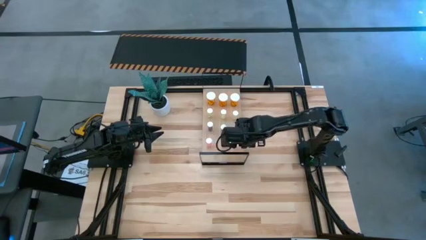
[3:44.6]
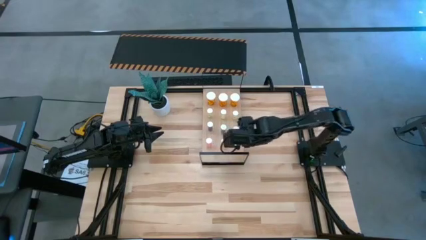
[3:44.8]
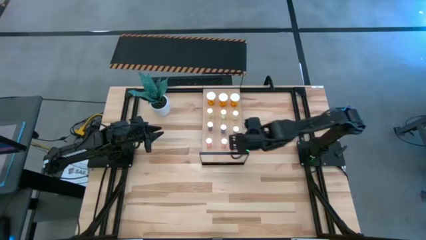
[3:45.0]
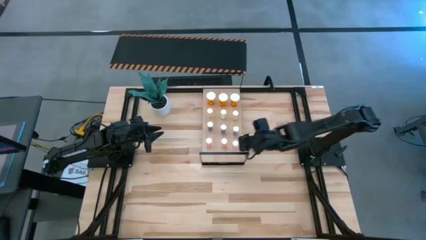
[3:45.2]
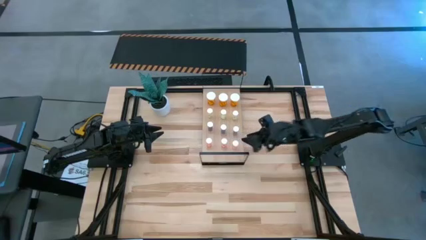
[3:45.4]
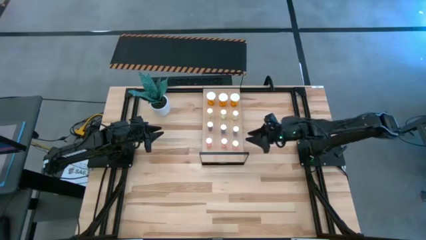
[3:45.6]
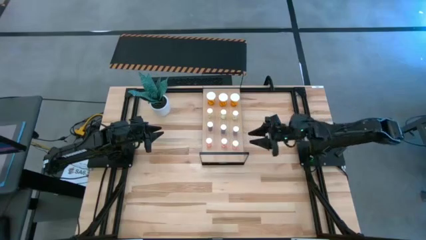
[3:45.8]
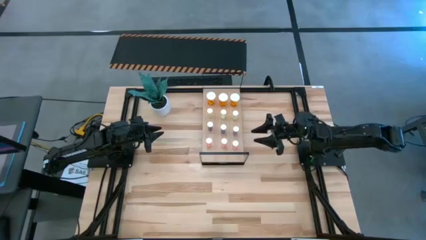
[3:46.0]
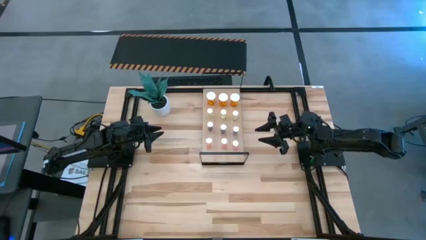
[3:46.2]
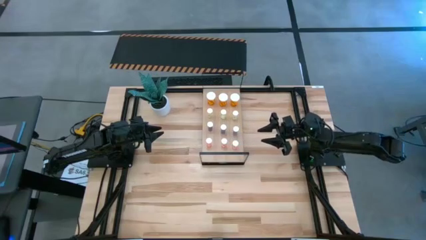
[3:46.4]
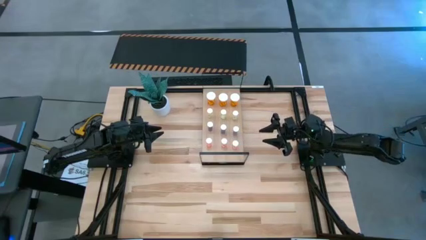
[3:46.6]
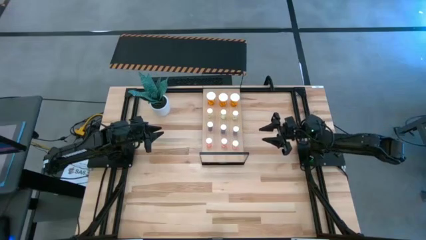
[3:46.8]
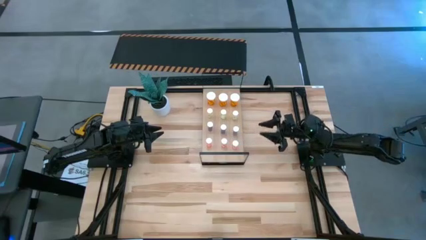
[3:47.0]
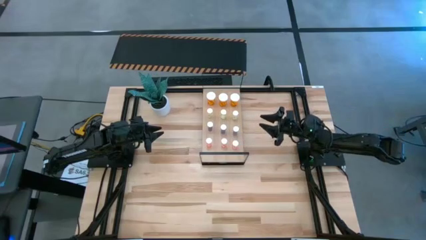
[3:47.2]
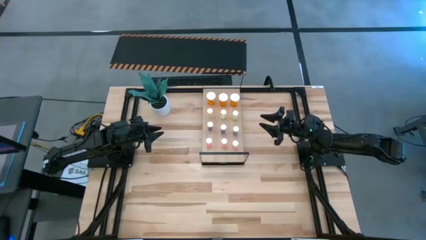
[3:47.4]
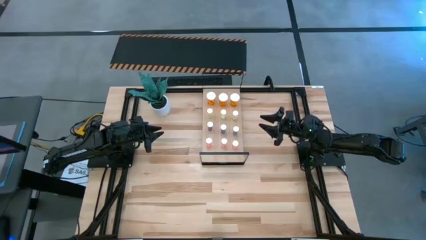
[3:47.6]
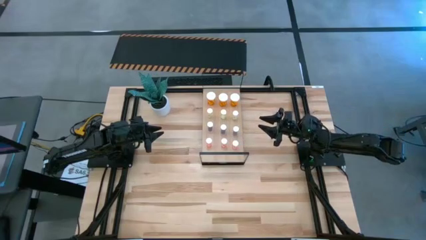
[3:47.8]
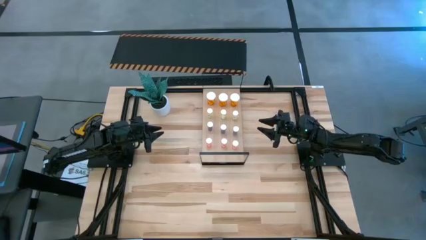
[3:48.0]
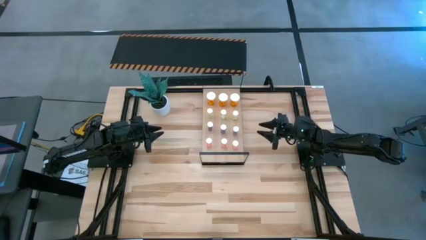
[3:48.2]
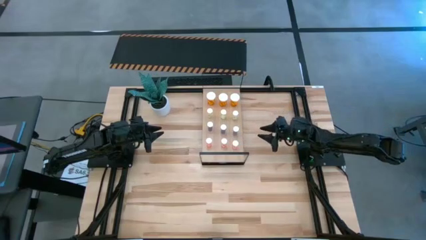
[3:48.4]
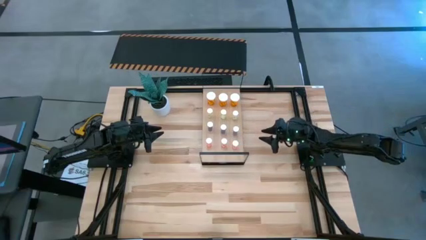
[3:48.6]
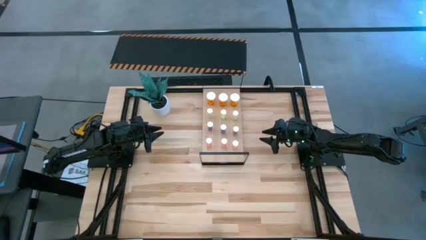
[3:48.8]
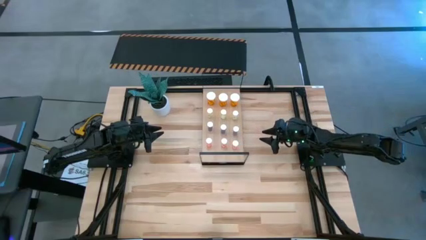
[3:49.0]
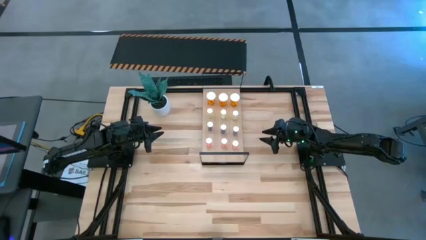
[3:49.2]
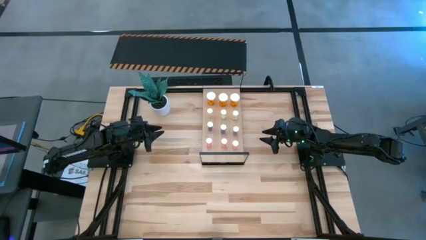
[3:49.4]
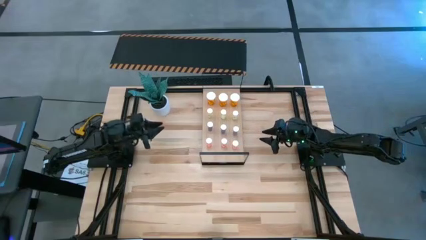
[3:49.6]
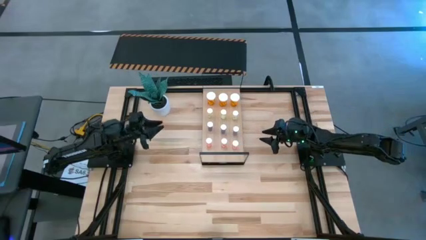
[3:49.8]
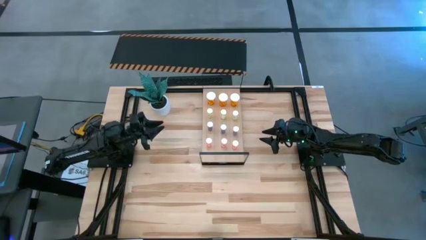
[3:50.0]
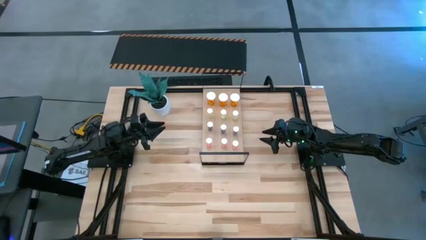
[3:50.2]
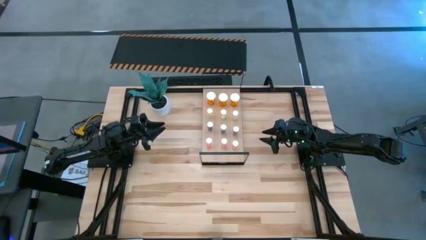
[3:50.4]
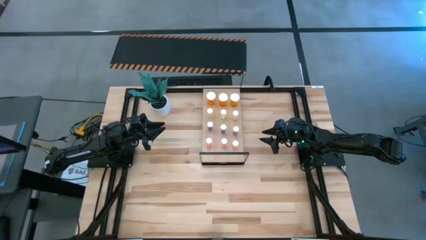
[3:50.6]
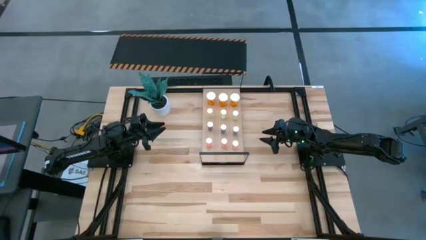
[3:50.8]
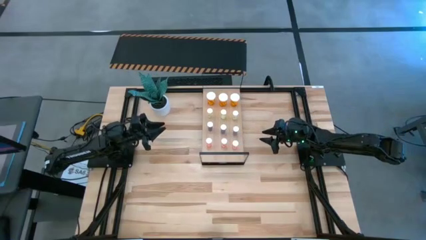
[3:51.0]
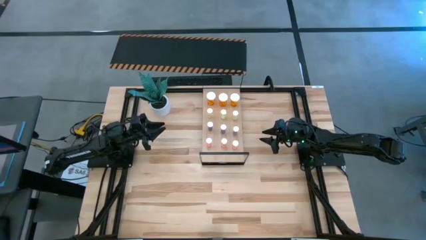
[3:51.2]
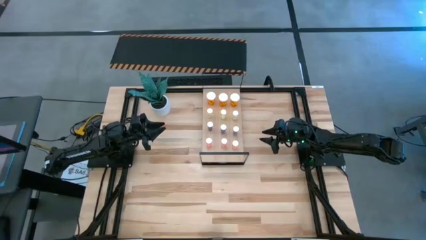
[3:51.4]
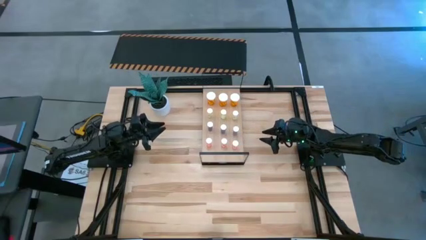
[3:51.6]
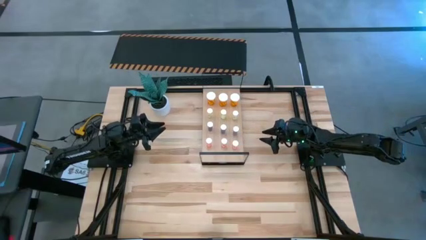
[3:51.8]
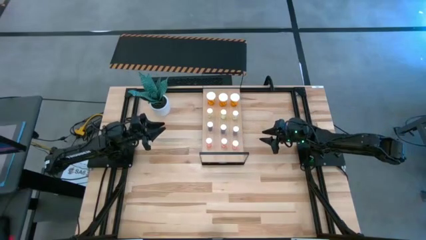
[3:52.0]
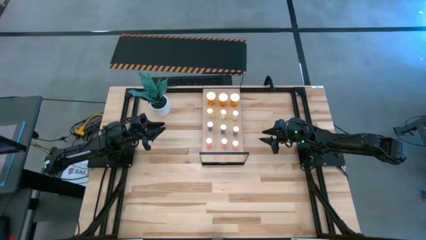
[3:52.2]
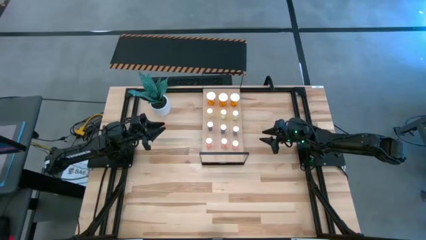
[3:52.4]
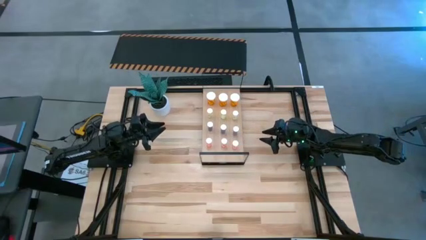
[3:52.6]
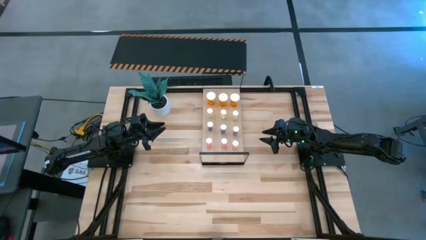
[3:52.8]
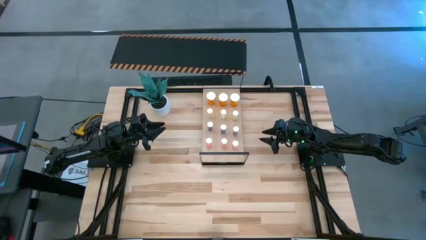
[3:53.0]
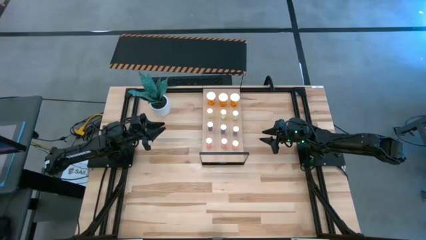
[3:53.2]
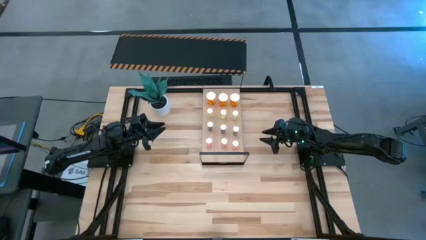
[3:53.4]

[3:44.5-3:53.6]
Task: Pick and place medicine bottles onto shelf by color
Return to Home Position

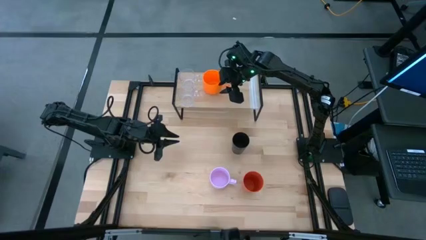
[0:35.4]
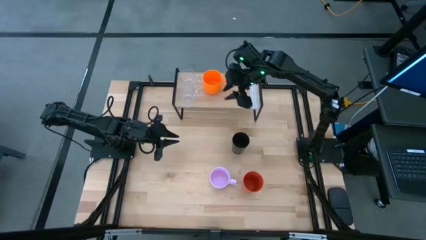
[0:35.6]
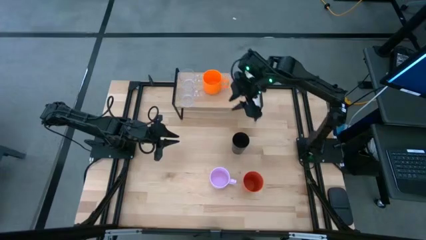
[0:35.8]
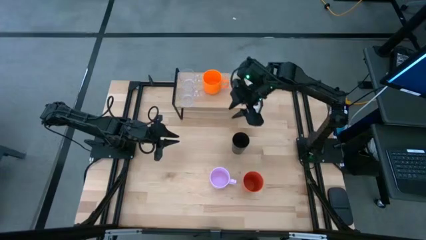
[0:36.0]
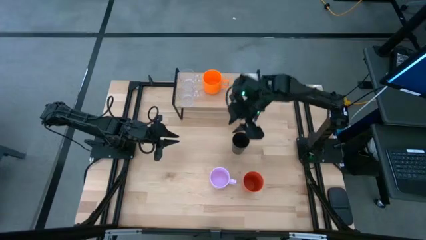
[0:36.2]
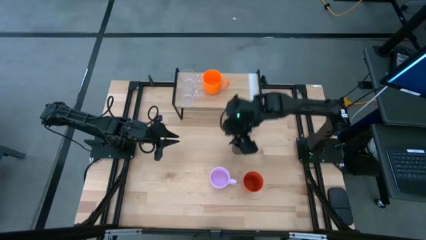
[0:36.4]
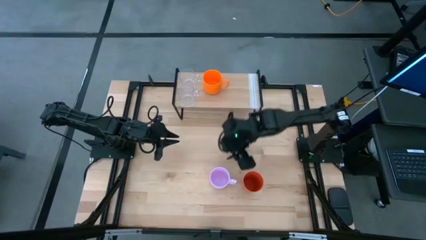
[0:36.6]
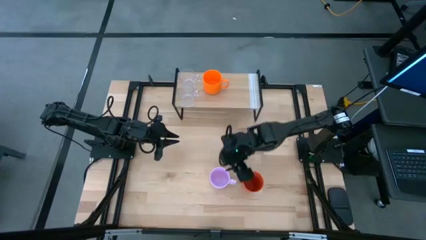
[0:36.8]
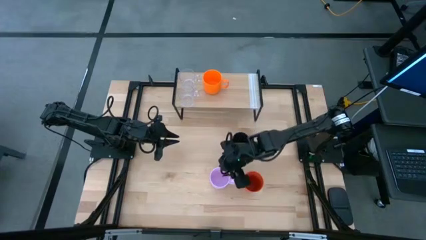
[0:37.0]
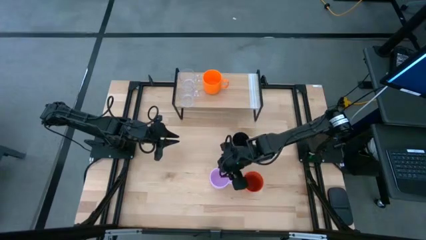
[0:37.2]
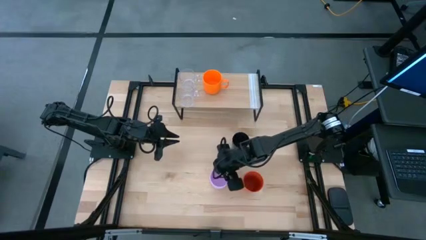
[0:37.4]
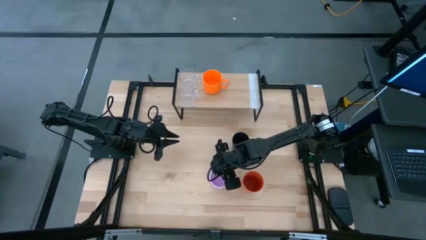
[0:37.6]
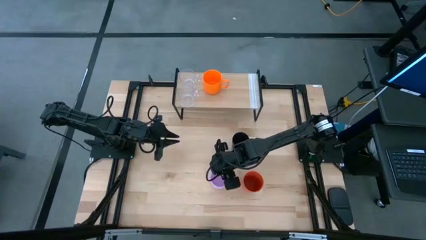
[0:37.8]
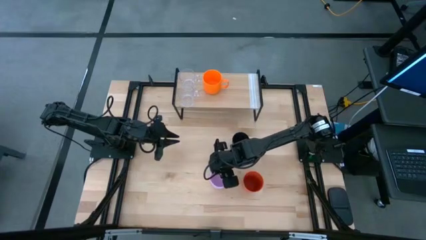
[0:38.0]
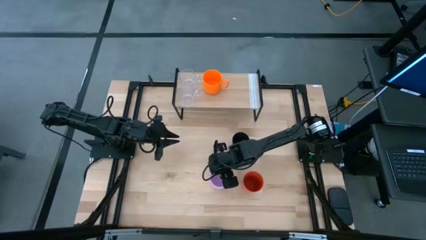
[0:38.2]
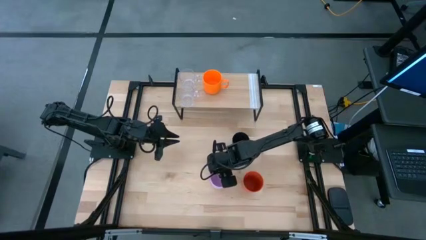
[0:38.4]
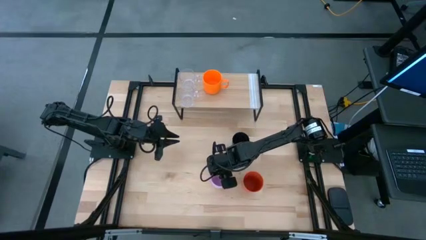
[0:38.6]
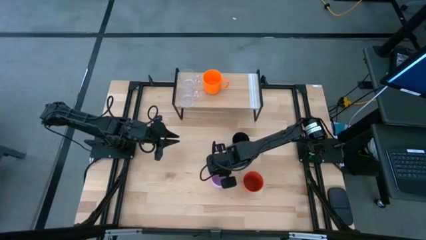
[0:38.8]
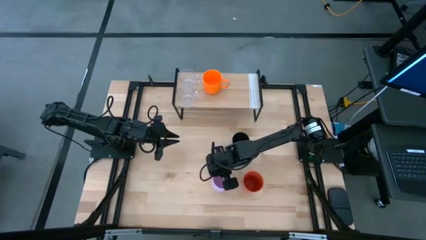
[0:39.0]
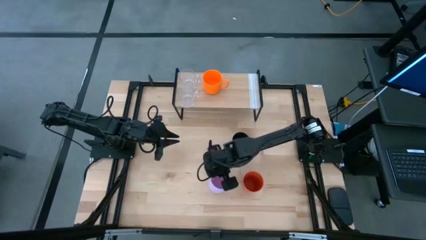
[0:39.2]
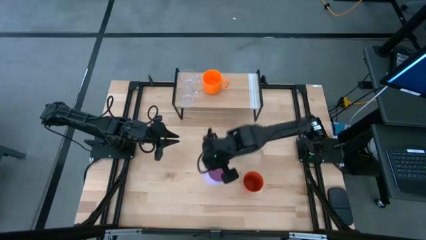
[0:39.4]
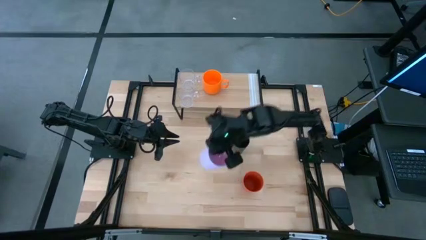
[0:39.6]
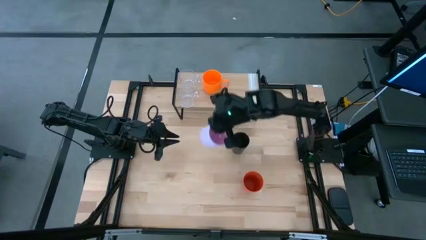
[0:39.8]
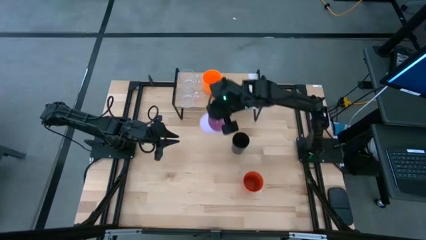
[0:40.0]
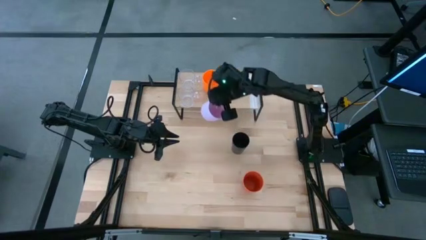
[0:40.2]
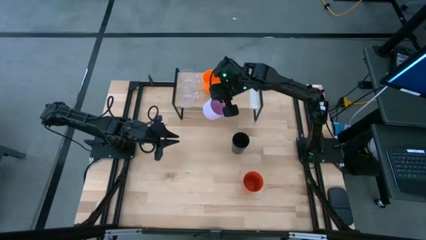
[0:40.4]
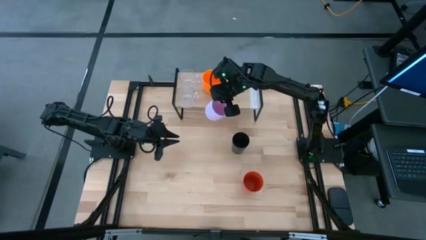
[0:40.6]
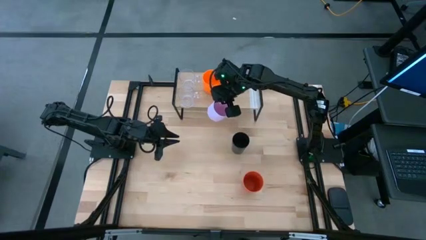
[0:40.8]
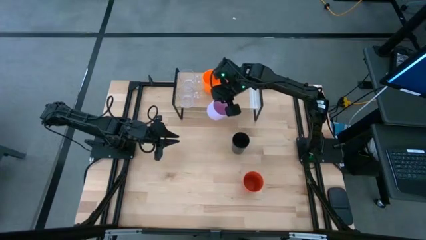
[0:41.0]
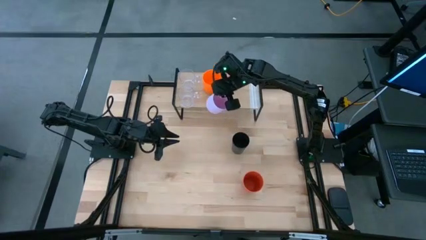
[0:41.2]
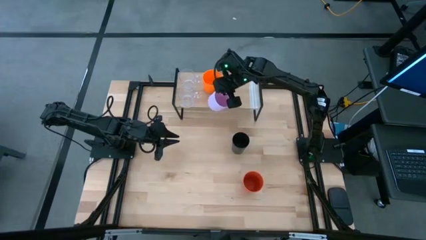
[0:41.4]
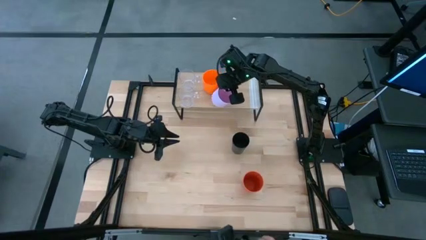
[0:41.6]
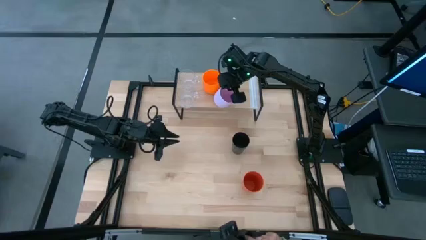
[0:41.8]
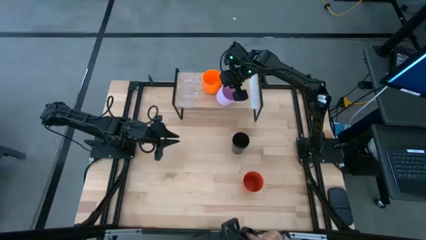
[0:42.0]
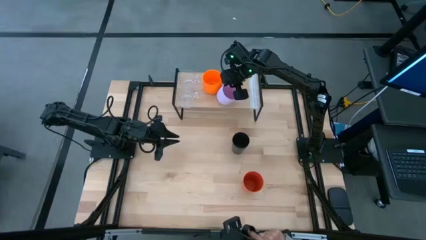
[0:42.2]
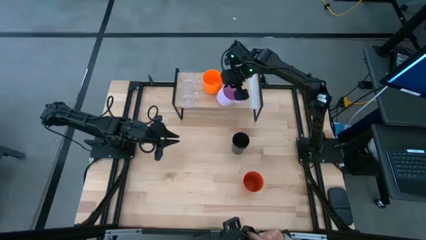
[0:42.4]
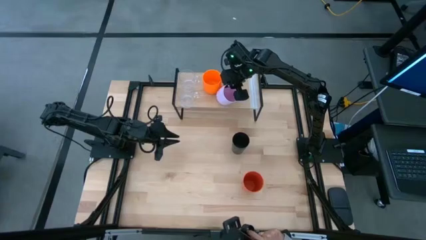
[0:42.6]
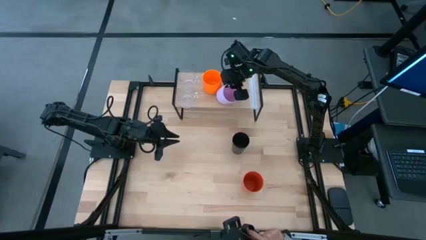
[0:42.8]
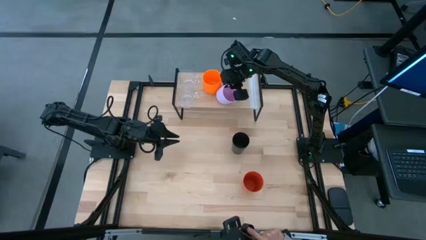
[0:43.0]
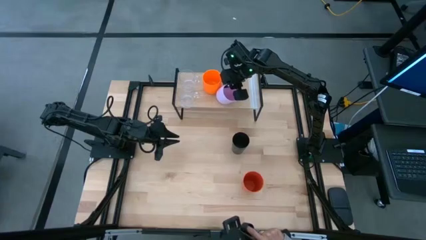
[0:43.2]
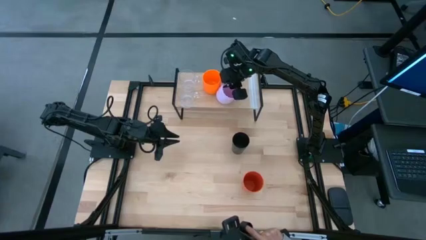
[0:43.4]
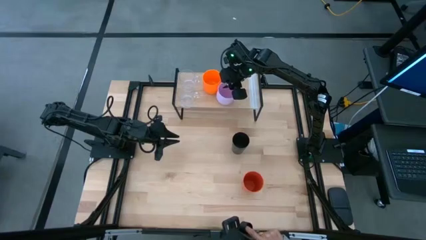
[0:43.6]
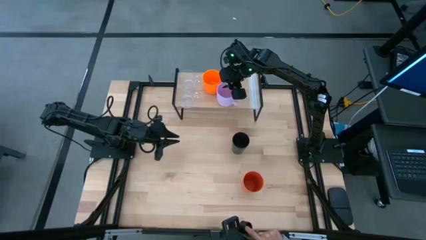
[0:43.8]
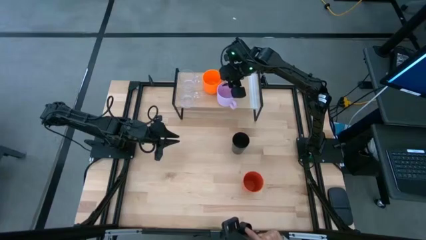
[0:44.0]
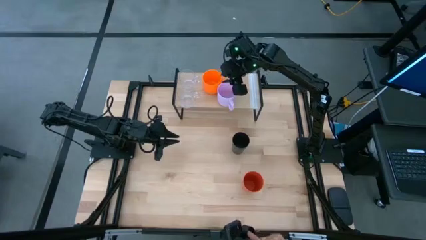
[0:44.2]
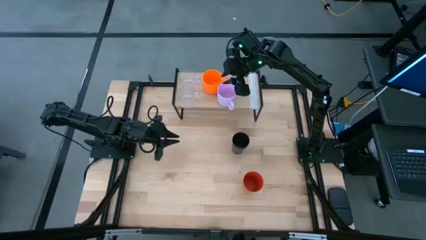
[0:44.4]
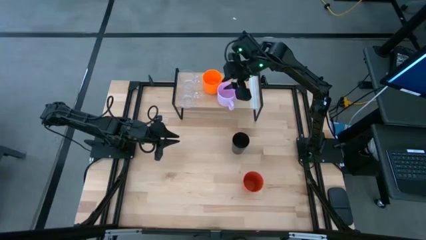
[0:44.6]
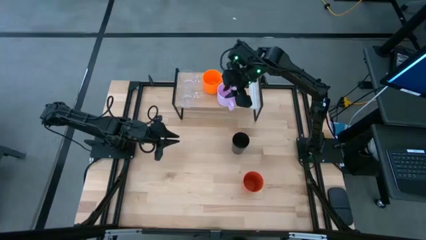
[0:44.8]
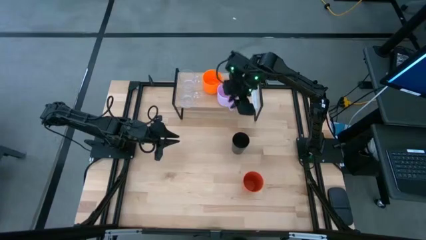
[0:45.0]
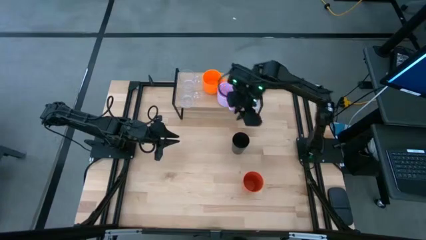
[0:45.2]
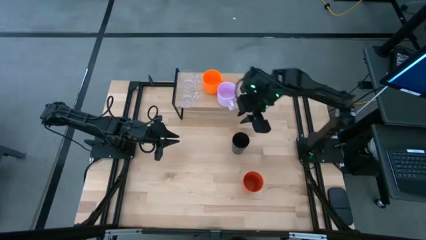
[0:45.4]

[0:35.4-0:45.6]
Task: Stack small to large cups/mugs on shelf
Put the pink mug on top of the shelf
